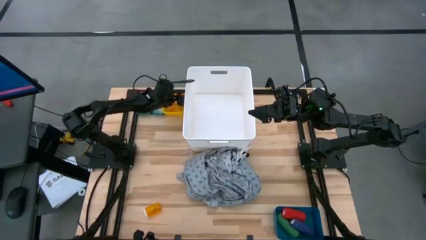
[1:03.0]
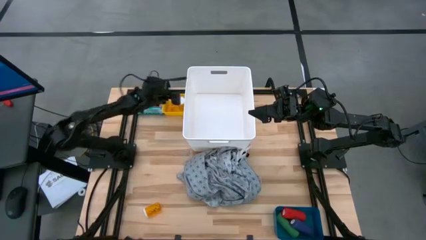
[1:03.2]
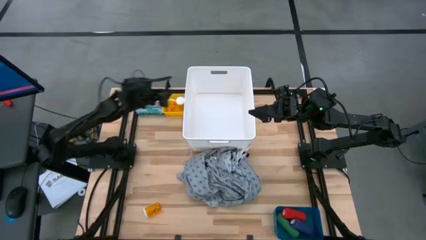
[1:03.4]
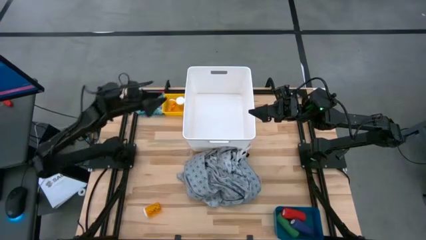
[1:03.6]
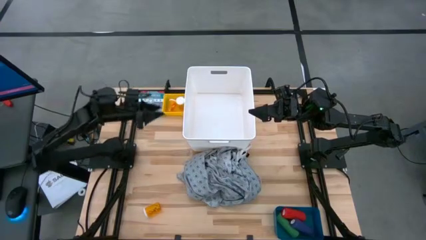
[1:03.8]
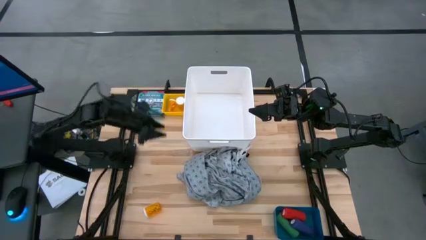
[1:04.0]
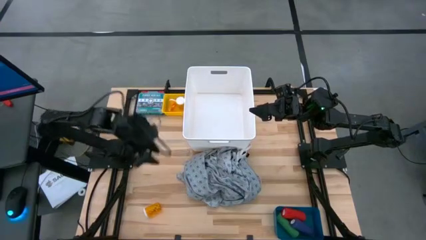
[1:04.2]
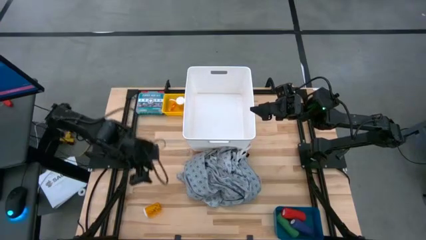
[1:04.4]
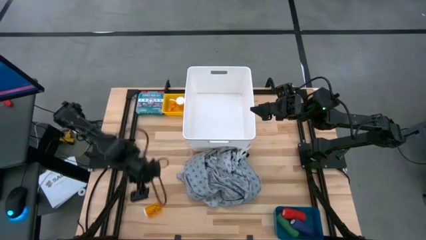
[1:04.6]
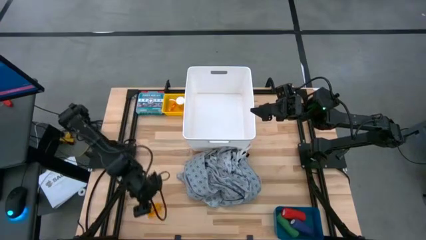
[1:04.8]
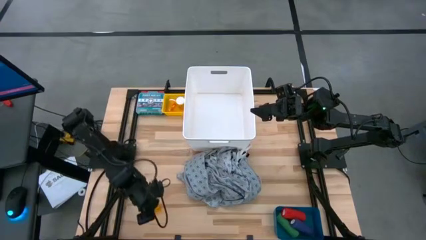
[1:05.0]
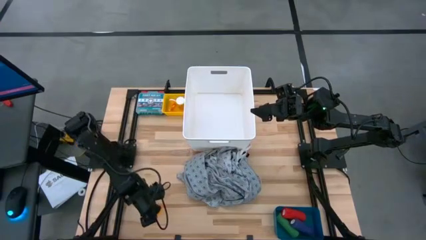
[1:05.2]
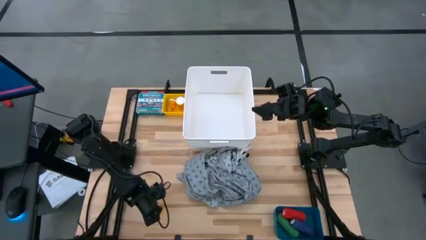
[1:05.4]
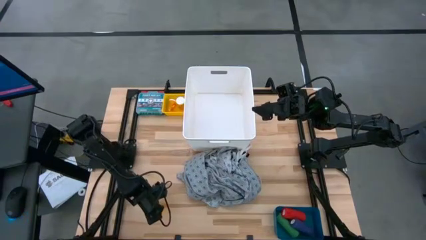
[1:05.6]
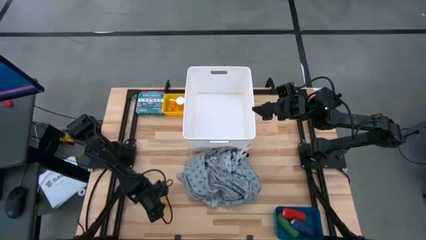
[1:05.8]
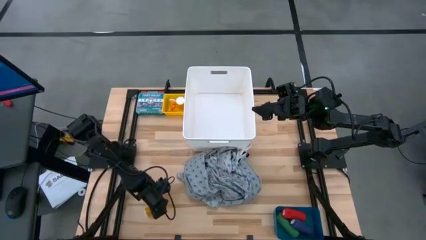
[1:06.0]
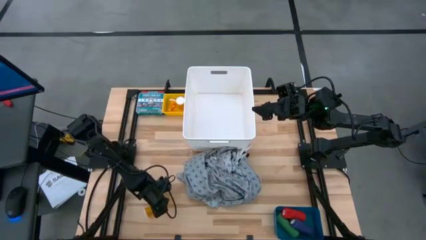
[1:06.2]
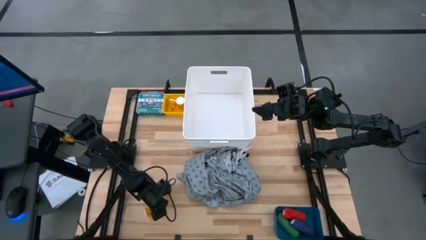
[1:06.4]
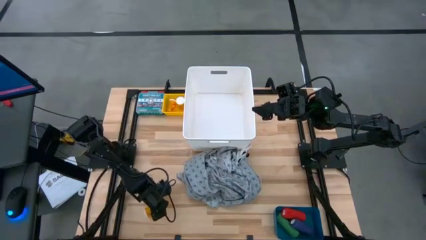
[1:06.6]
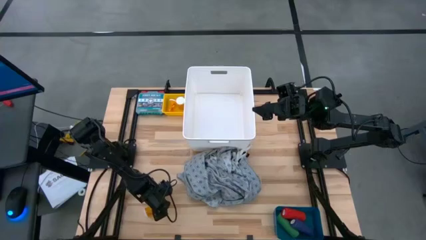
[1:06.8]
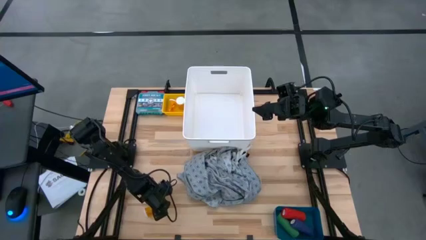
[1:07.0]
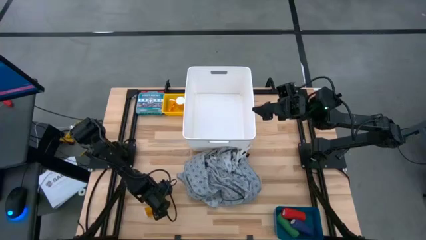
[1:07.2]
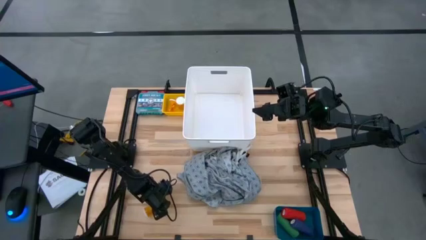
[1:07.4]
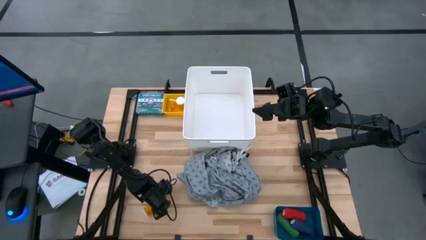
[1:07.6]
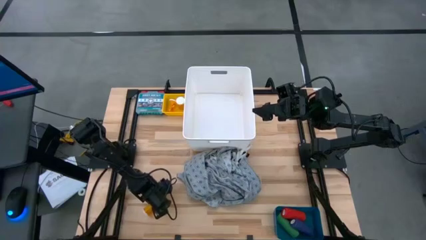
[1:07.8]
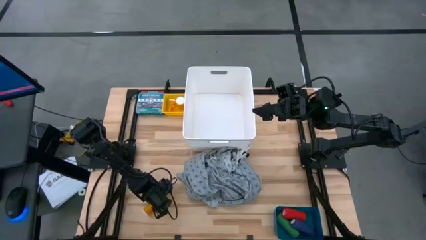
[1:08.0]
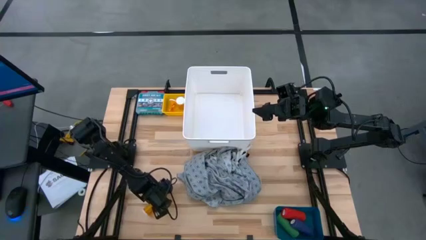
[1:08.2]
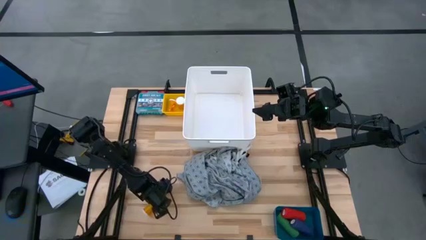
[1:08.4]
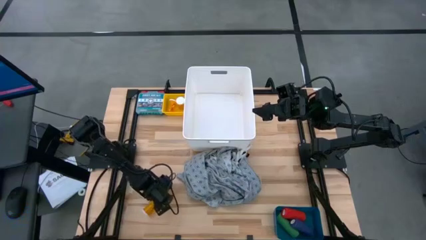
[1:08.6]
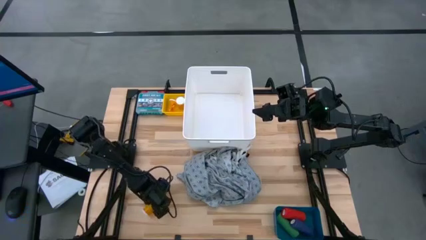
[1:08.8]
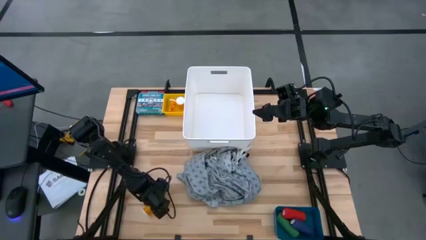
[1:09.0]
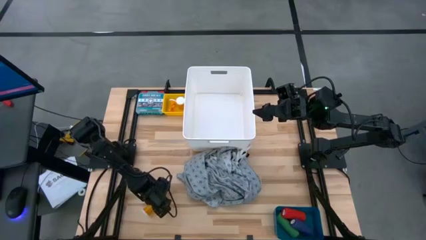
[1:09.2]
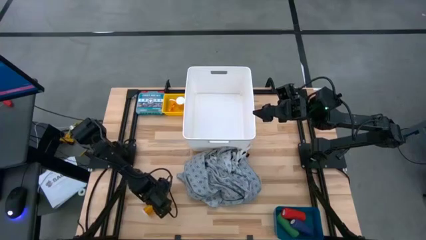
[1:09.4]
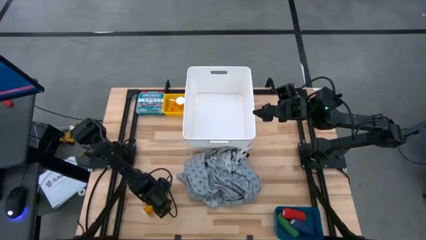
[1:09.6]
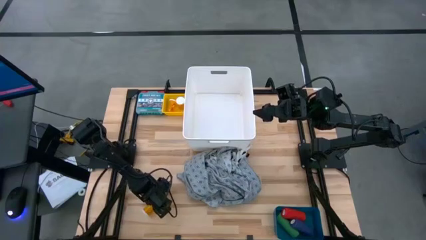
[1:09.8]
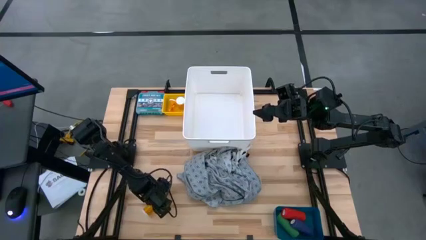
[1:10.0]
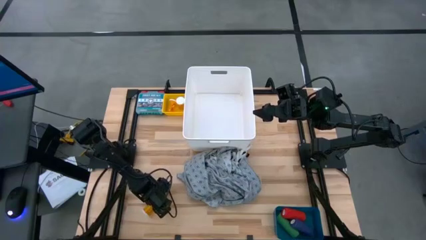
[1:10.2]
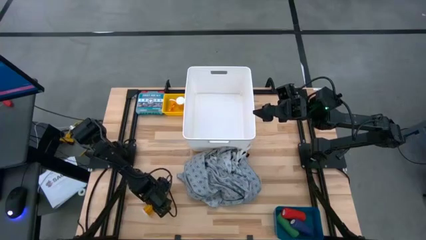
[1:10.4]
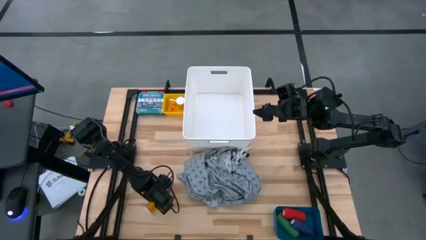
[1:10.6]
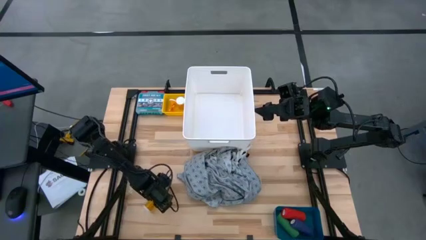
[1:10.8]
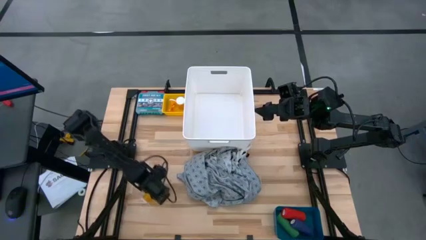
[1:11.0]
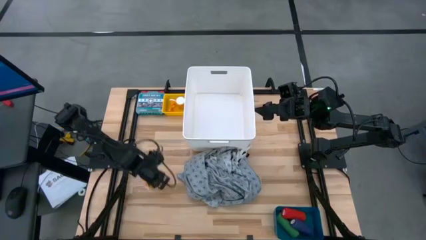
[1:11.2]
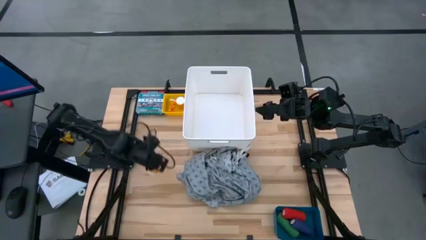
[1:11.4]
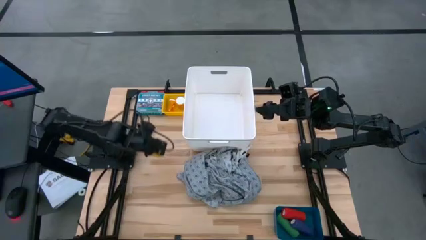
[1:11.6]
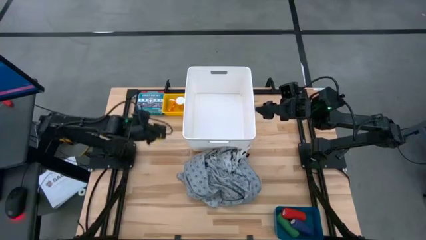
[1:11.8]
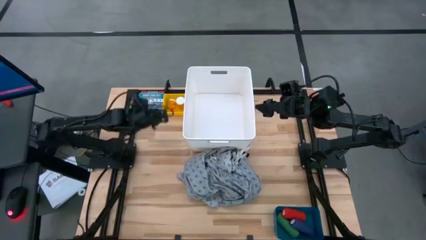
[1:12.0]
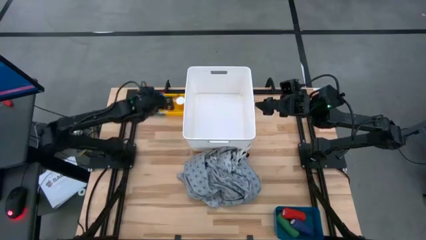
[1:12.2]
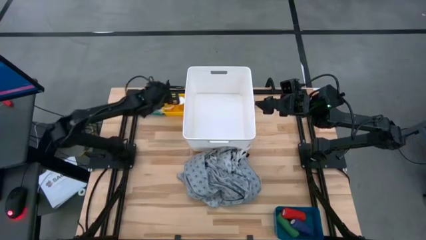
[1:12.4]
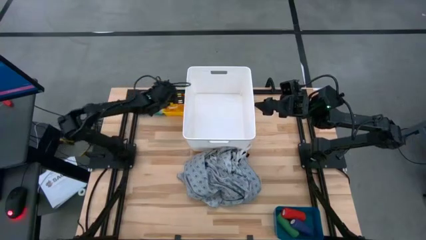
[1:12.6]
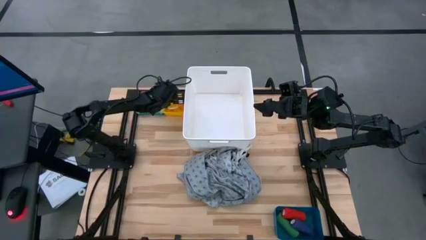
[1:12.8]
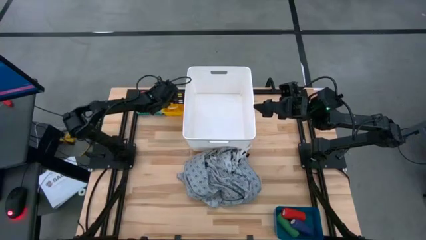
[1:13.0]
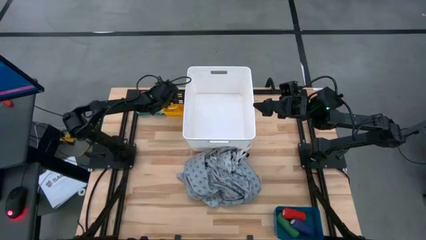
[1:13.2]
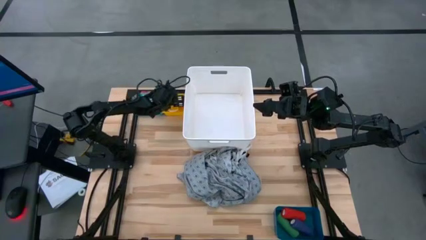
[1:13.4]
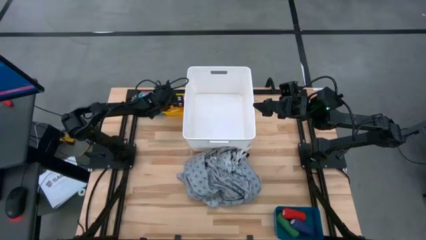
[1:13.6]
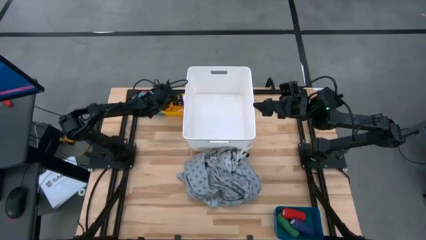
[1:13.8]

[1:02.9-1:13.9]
Task: Pick & place medical supplies in basket/bin
Put the orange pill bottle into the yellow bin
